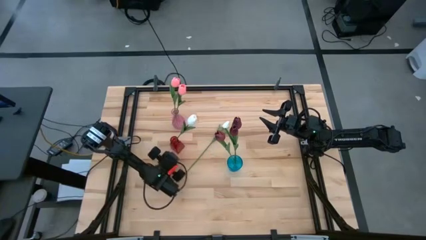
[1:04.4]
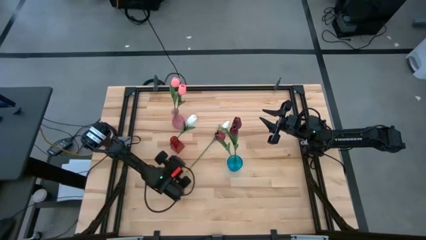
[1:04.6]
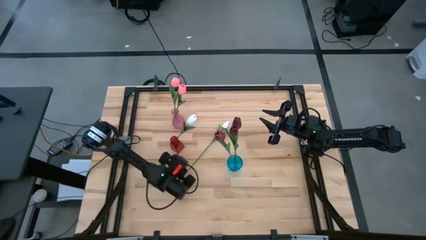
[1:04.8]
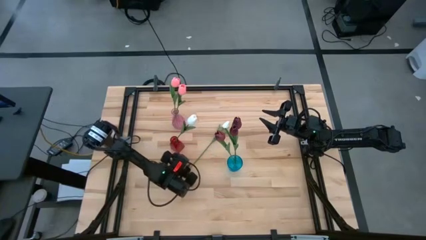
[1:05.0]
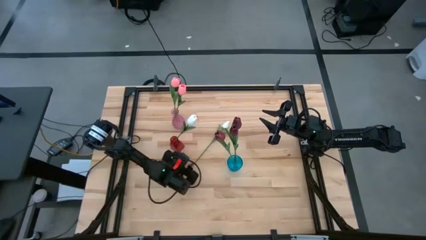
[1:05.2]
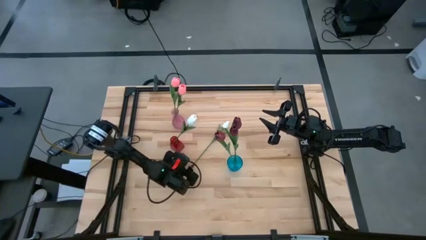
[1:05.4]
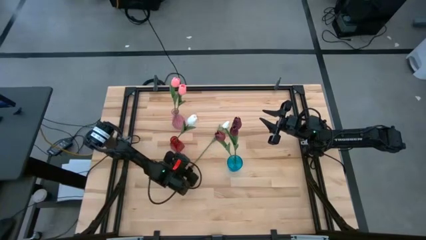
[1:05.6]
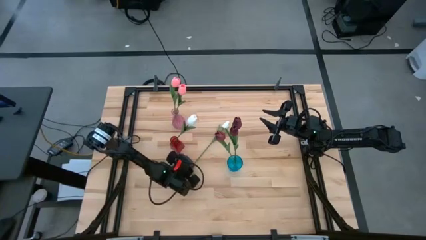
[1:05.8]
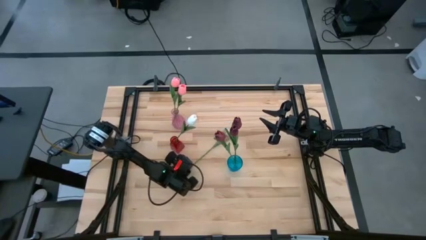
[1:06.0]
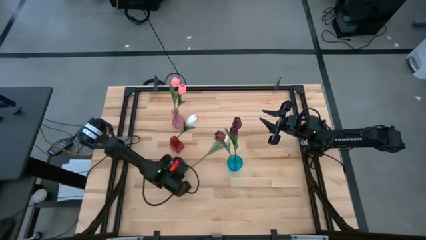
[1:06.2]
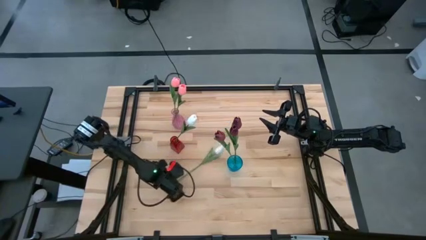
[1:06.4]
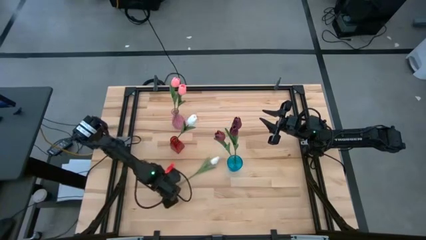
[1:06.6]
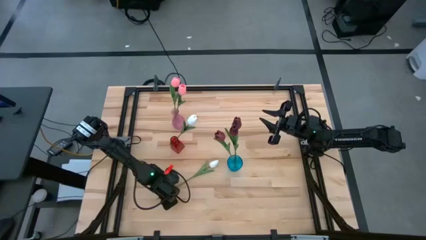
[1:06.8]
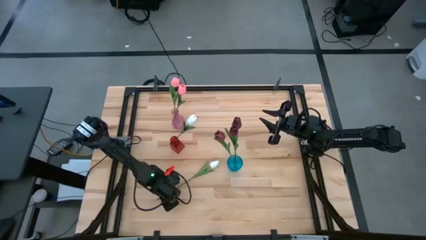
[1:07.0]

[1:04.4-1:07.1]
Task: Sort flowers into vase by color
Put the white flower into the red vase

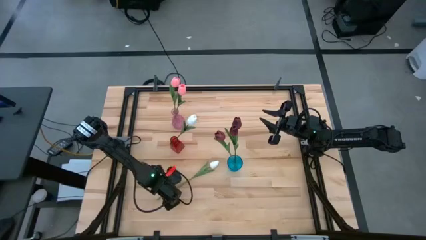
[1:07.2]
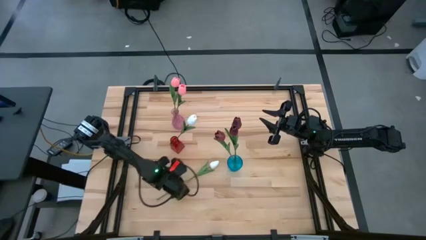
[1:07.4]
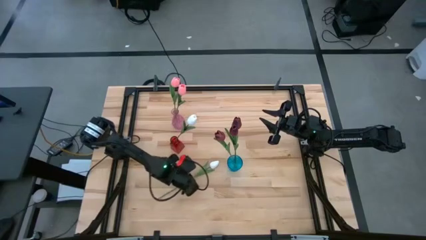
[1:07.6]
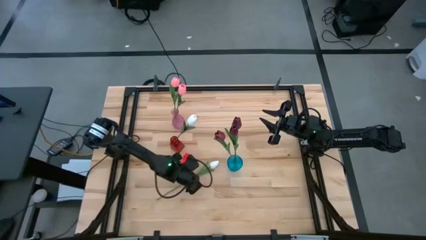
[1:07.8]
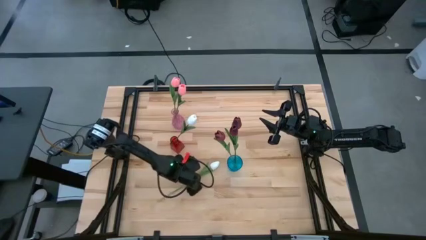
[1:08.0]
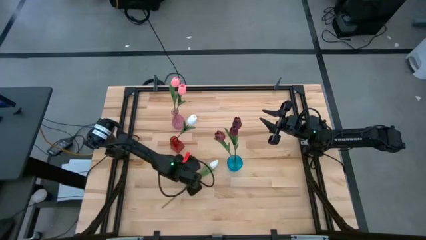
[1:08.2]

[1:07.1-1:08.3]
Put the white flower into the red vase

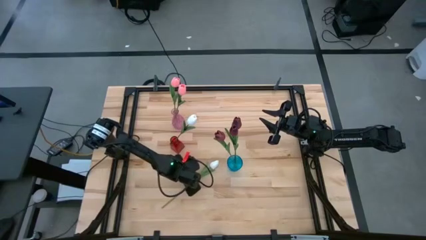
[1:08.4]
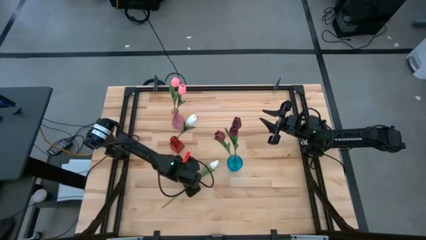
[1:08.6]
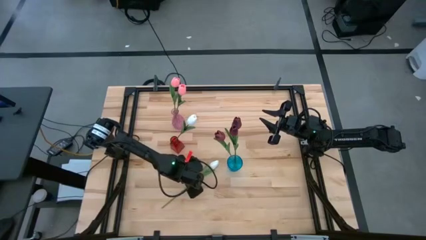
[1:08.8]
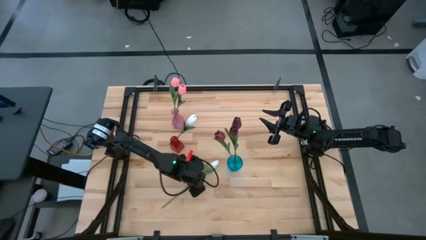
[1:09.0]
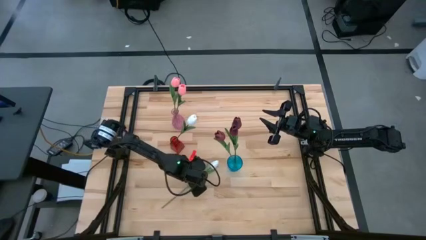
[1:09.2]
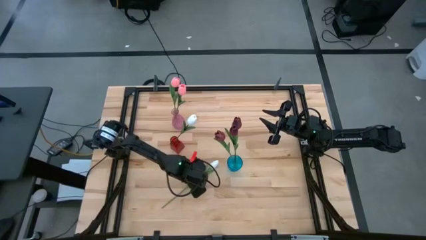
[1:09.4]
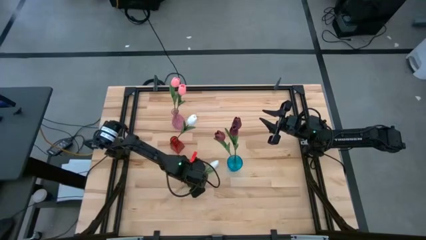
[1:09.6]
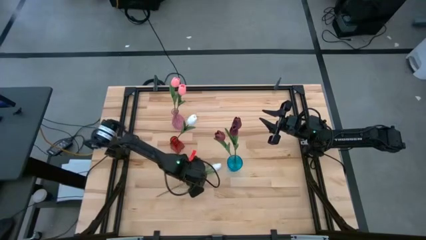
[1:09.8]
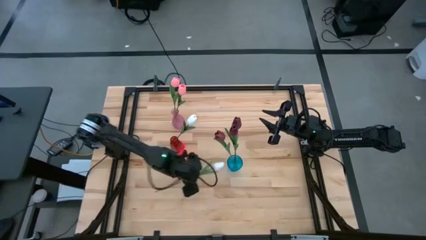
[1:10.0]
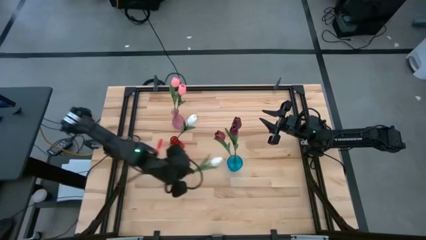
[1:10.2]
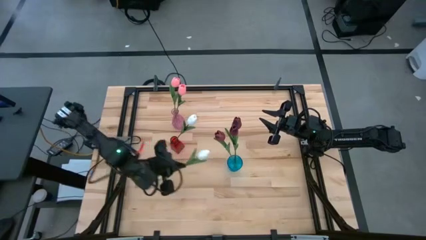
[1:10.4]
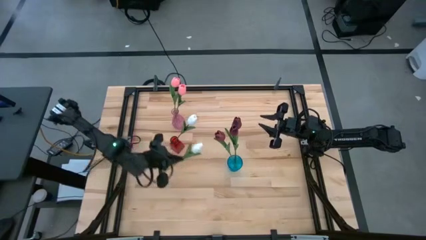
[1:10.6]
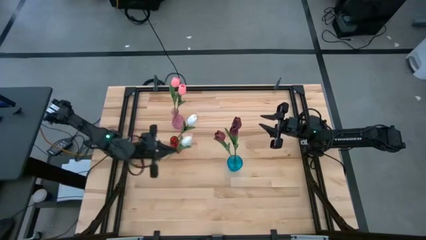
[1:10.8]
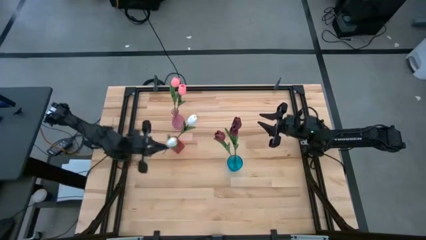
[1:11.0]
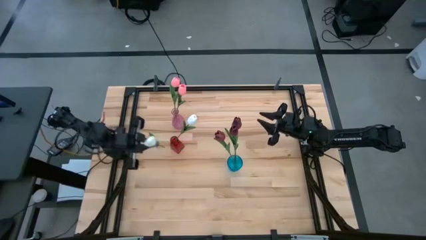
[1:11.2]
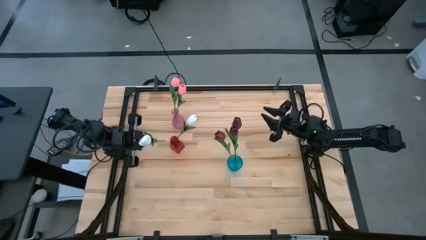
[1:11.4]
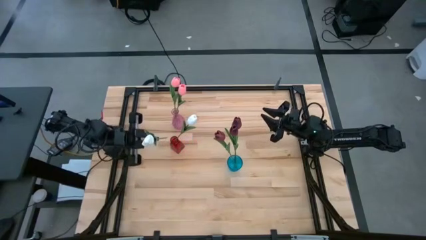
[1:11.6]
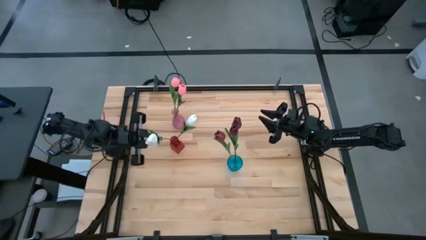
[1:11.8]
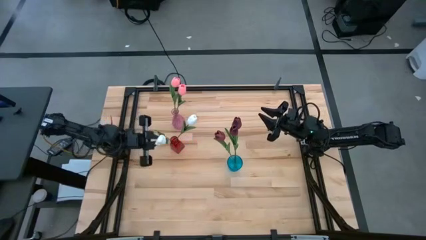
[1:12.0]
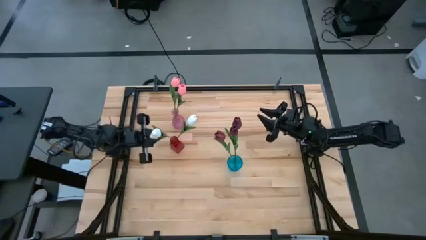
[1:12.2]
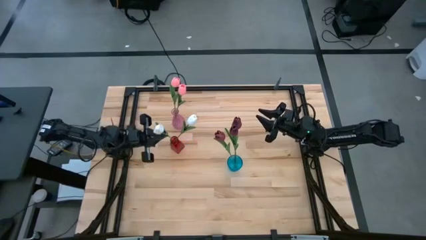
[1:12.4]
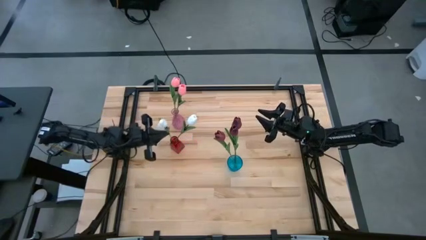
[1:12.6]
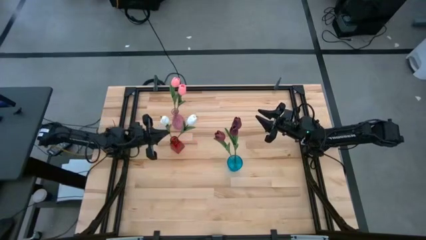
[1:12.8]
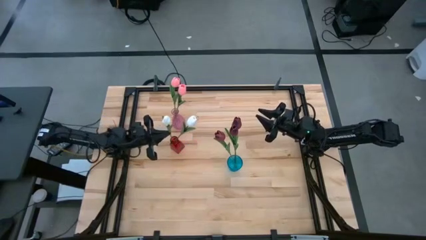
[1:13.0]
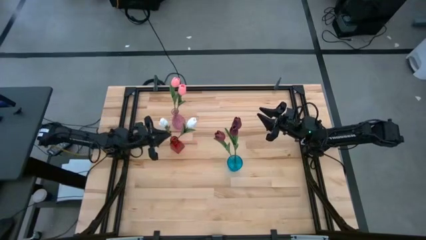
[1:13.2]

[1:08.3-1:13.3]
Put the white flower into the red vase

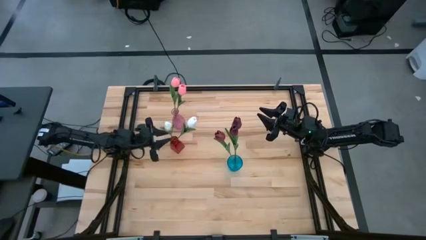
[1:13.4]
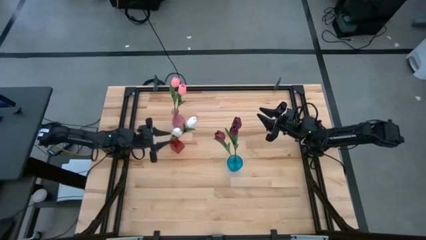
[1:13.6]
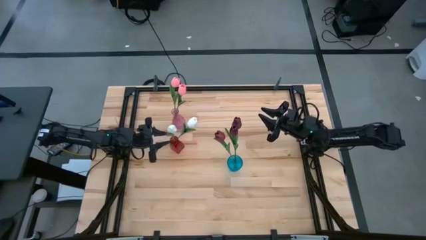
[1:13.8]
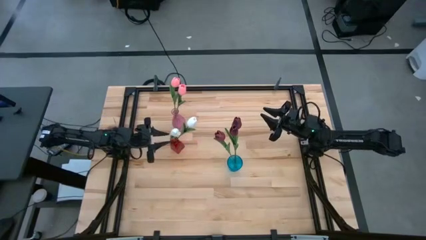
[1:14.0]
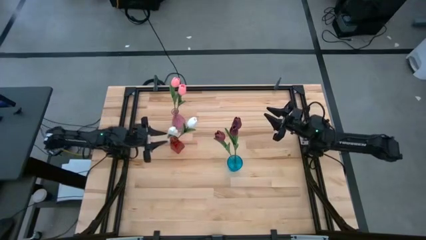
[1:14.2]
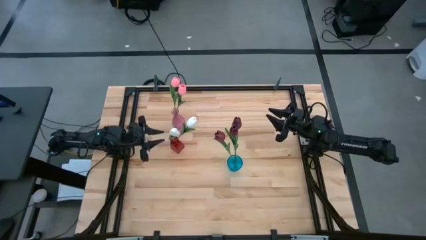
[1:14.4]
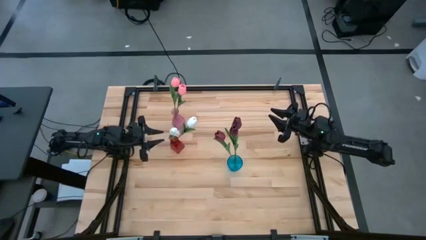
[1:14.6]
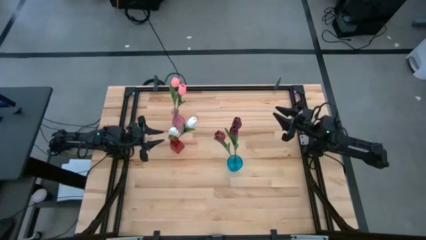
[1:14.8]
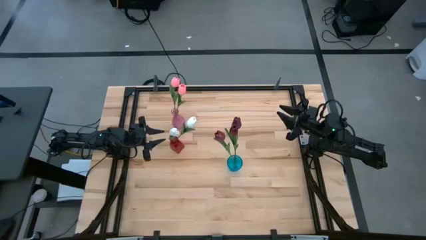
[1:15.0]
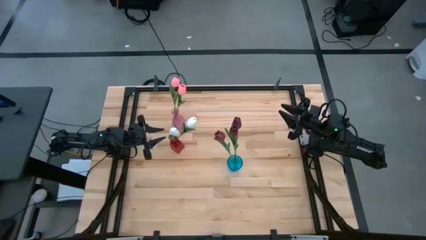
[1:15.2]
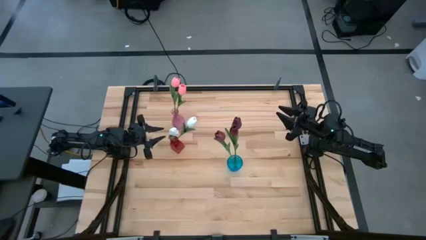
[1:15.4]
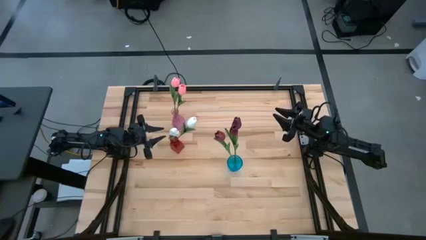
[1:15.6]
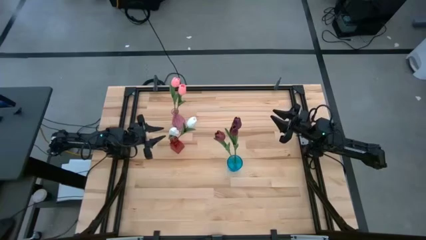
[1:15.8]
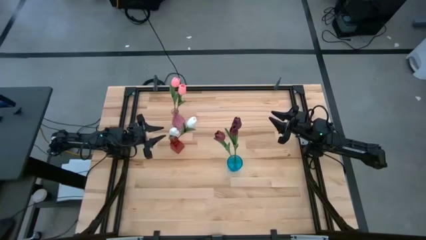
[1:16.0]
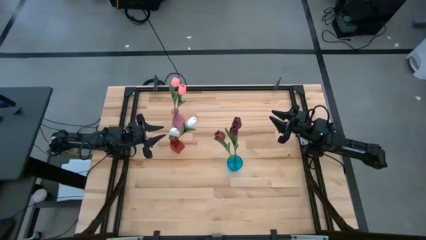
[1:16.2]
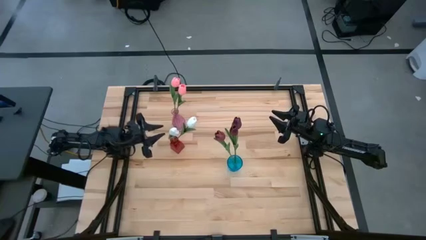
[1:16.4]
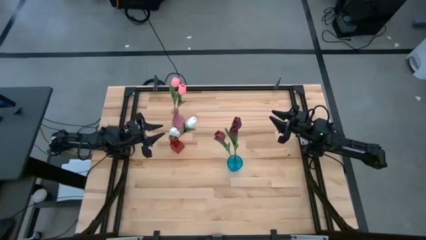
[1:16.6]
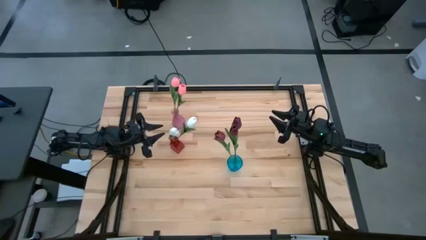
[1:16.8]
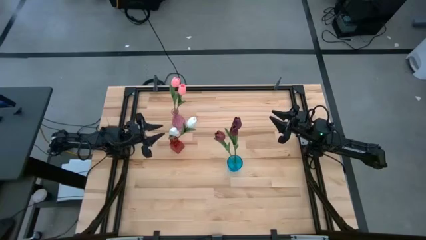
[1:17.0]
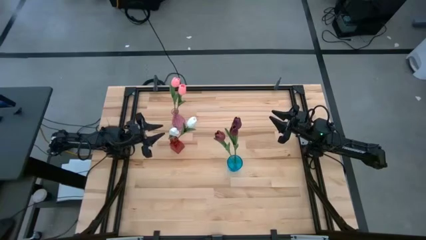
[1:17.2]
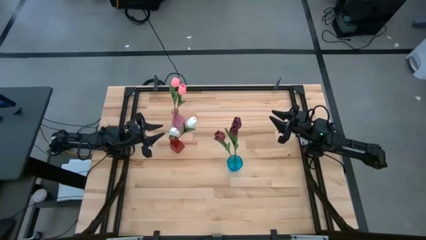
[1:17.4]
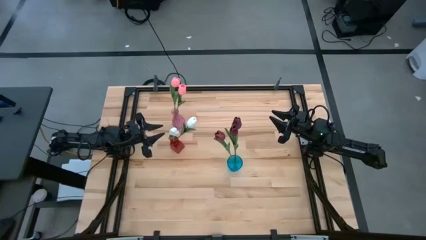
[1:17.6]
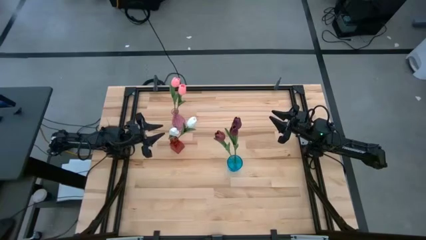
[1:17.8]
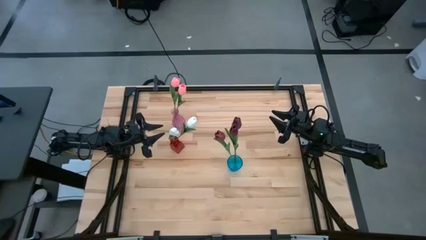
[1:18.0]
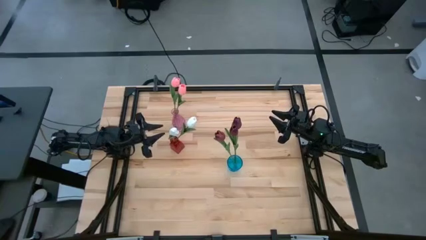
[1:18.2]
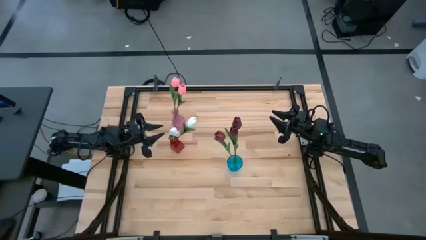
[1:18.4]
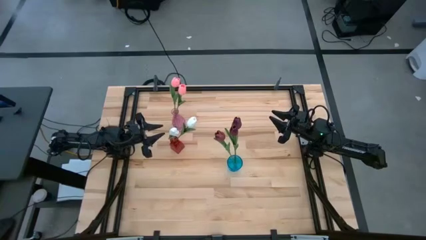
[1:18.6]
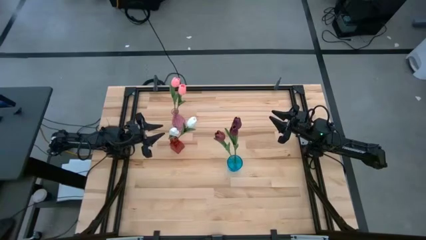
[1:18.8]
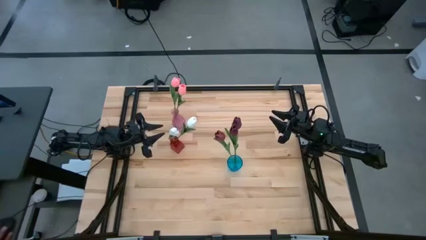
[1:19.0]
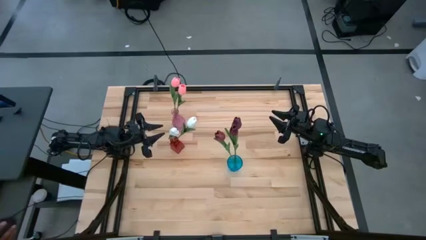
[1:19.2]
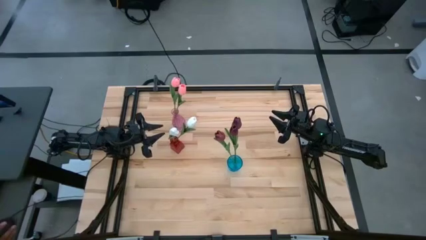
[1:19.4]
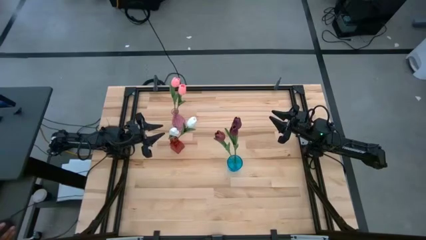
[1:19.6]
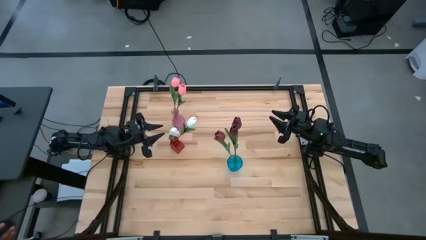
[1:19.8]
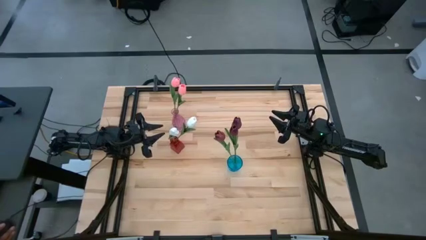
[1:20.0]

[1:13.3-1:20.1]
Return to Home Position
